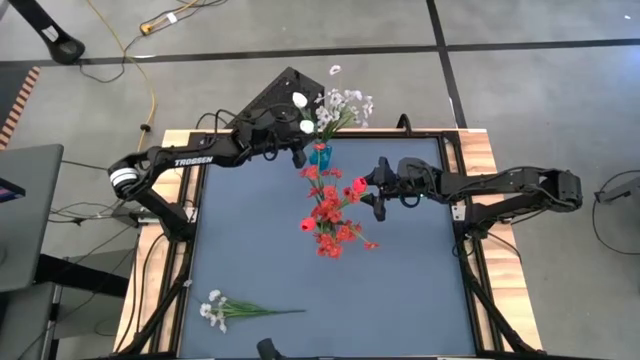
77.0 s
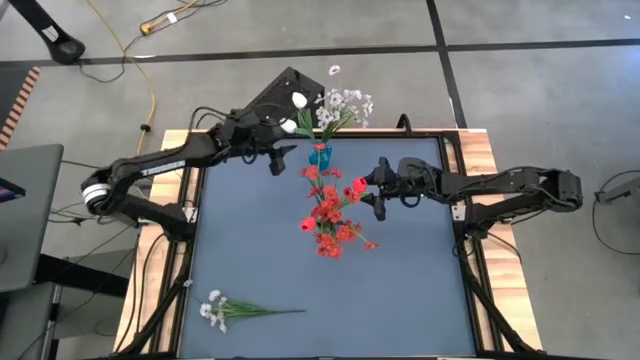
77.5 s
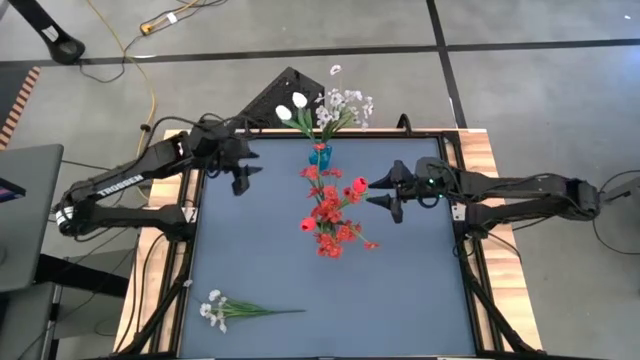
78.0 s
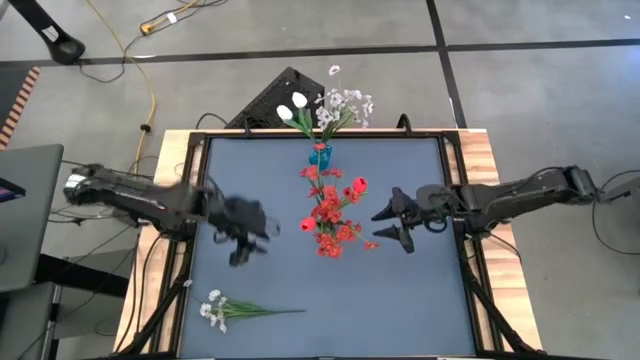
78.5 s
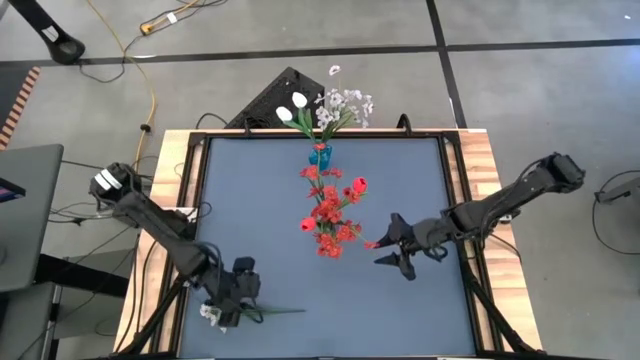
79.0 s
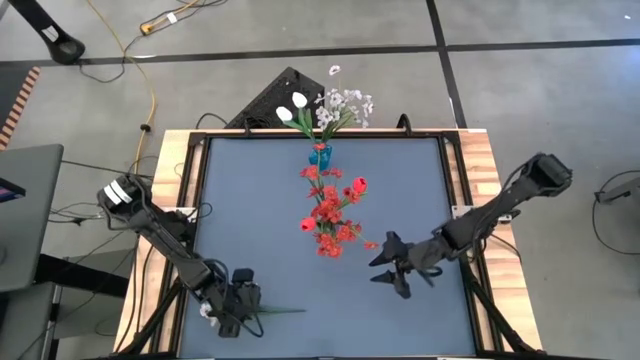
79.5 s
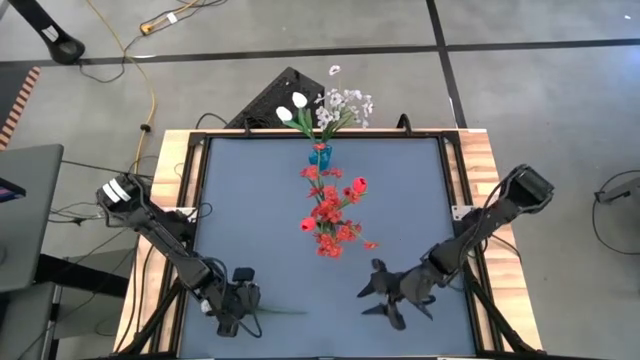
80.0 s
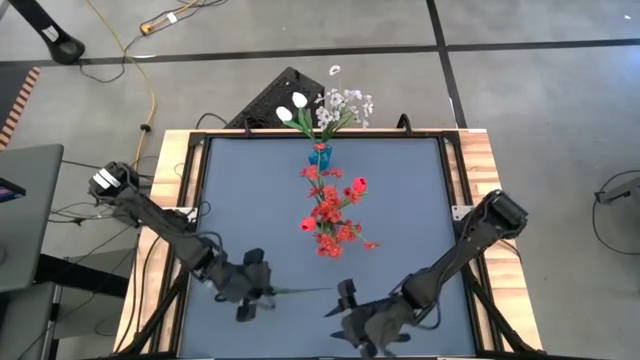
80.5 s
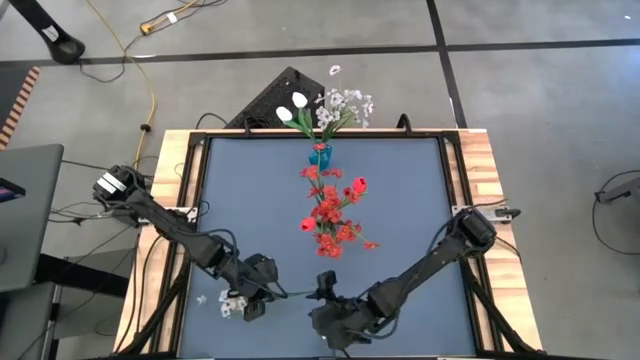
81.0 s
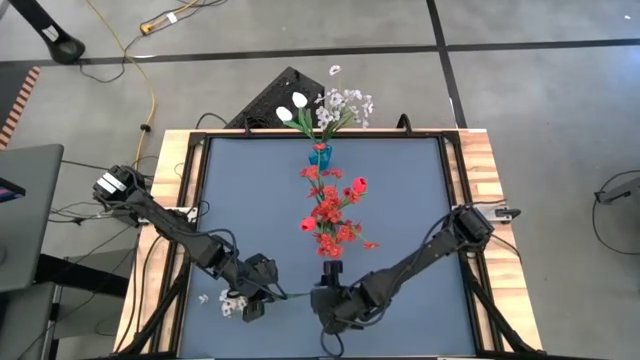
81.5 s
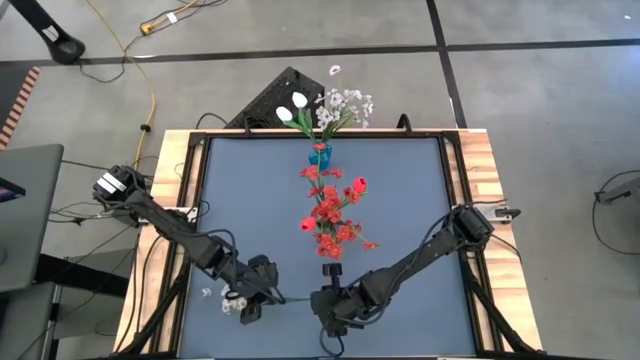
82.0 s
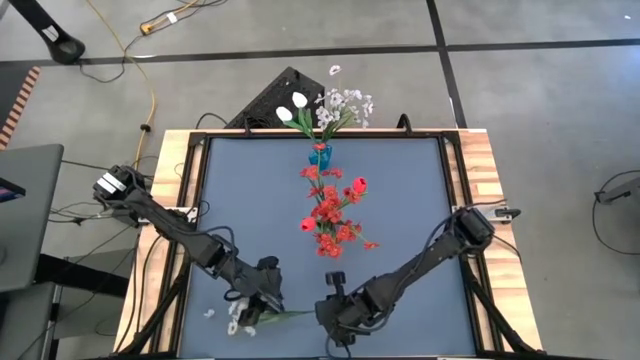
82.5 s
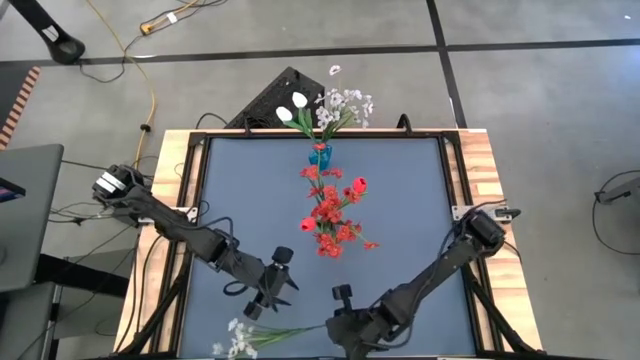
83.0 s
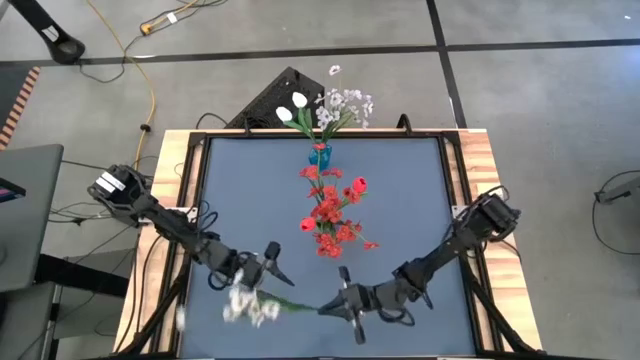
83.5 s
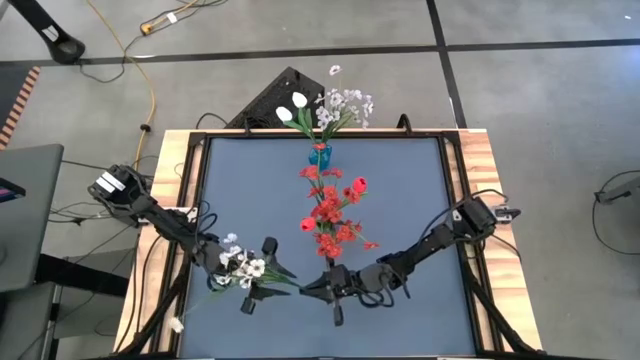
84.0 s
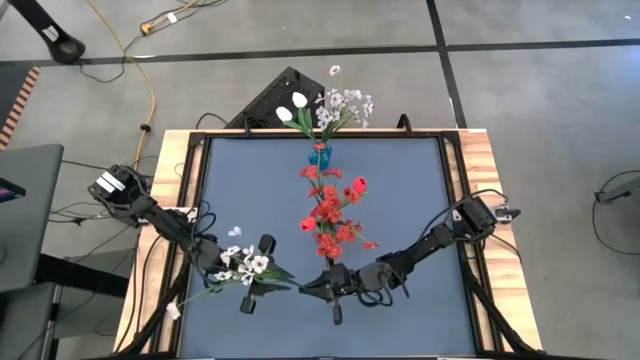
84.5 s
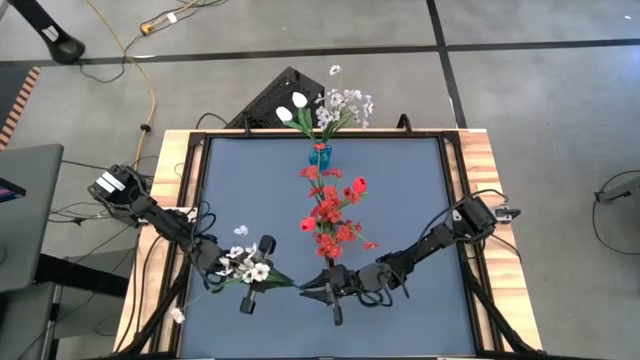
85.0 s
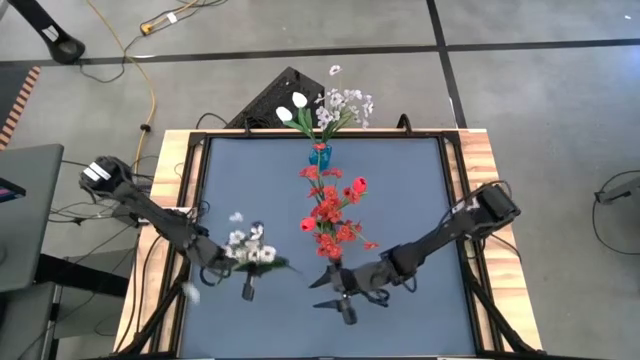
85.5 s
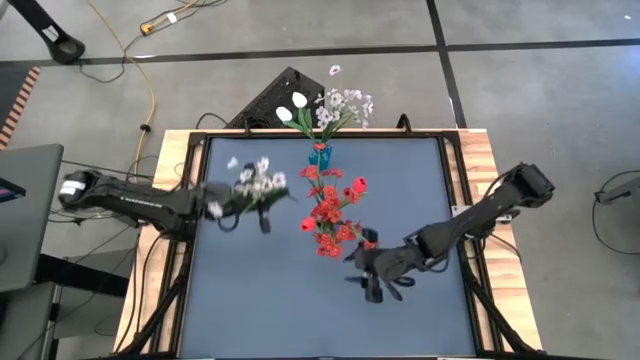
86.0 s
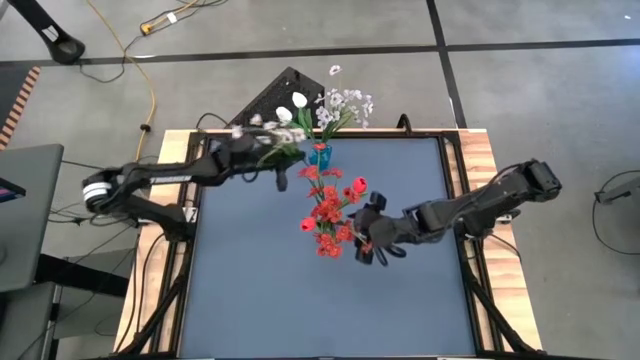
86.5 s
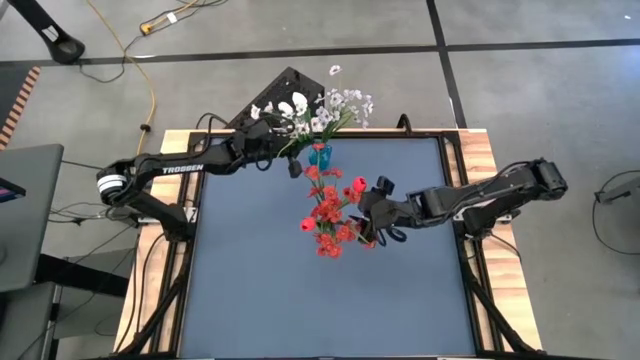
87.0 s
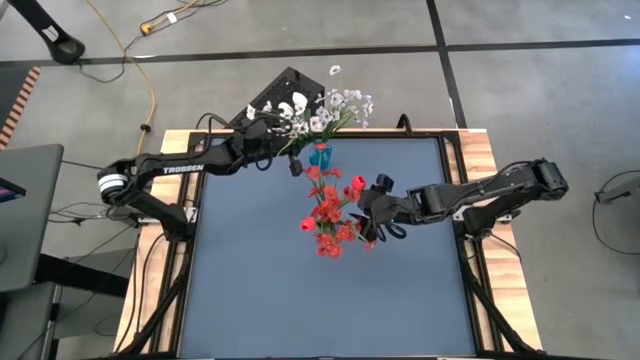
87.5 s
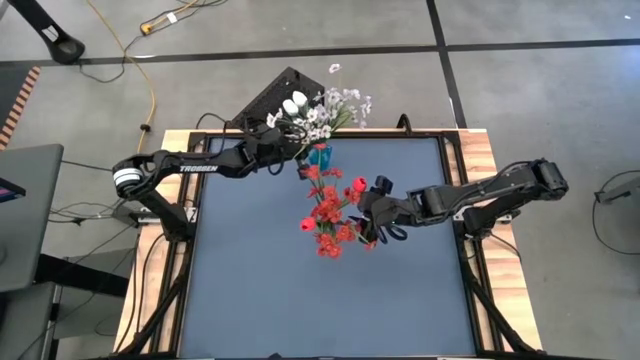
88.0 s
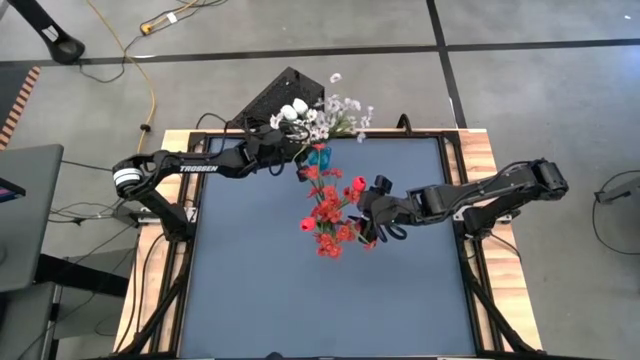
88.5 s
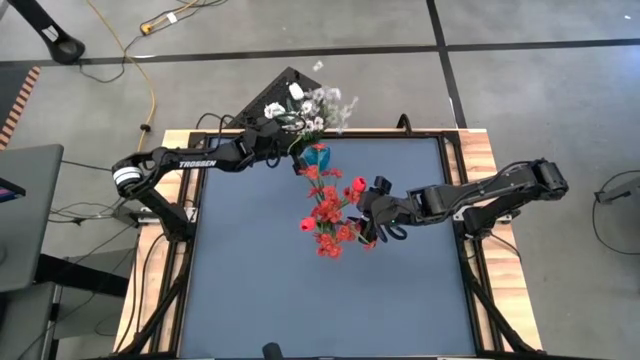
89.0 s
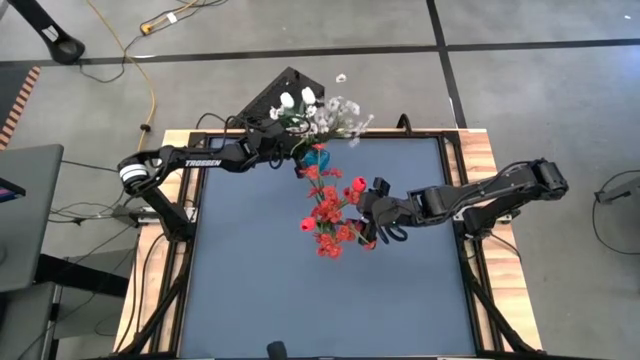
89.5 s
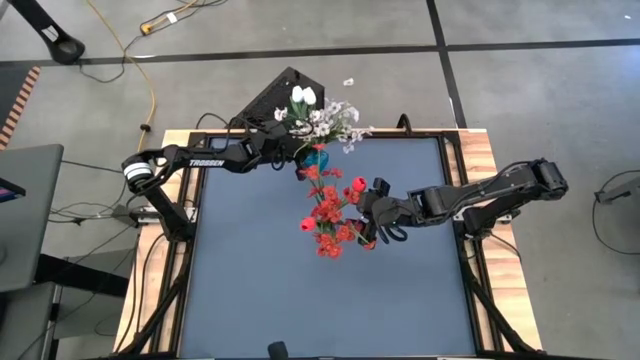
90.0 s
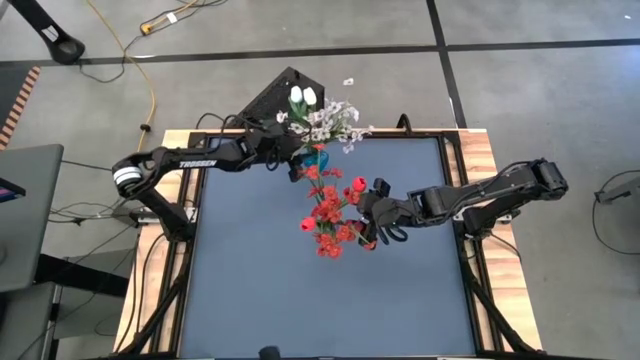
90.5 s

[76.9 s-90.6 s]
Task: Sort flowers into vase by color
Put the white flowers into the blue vase

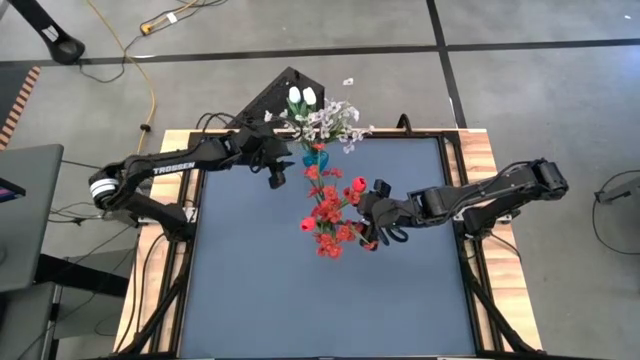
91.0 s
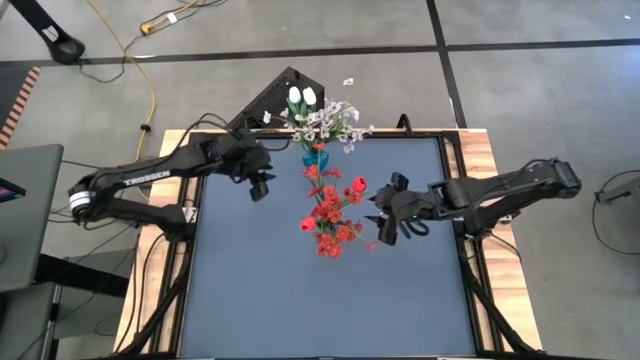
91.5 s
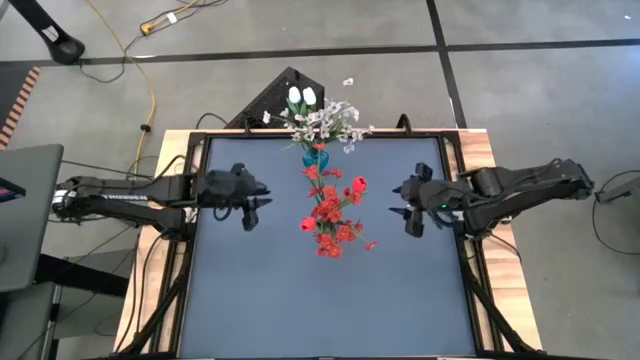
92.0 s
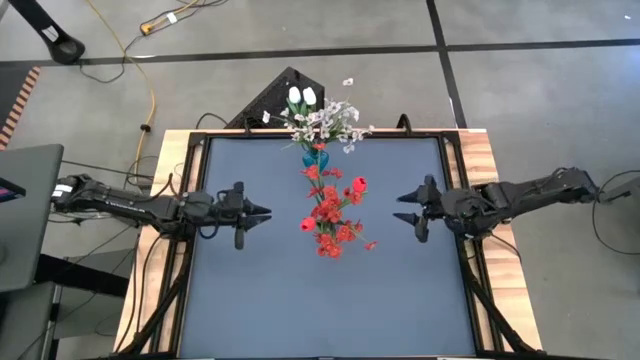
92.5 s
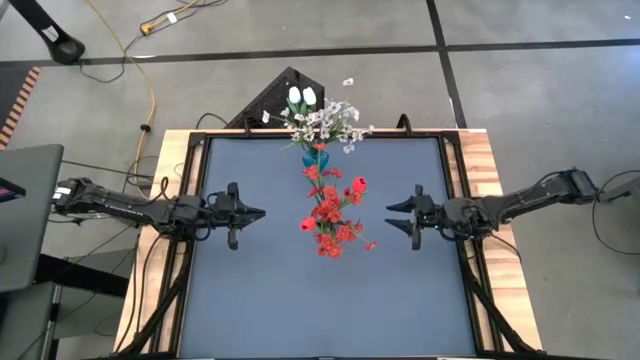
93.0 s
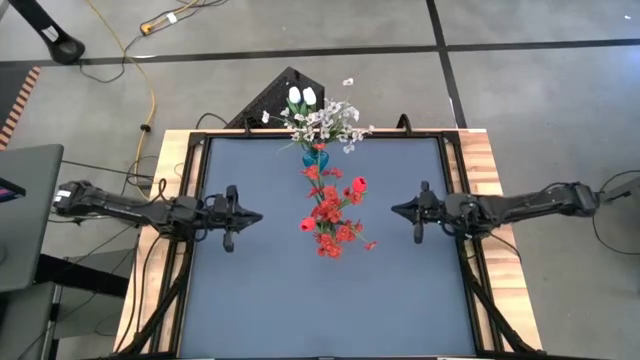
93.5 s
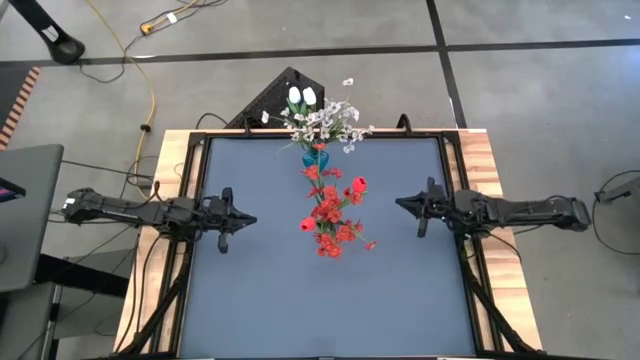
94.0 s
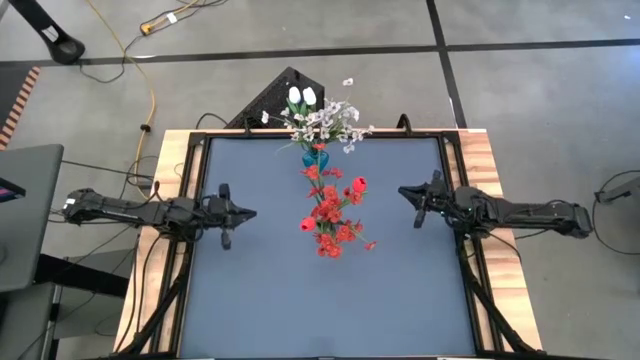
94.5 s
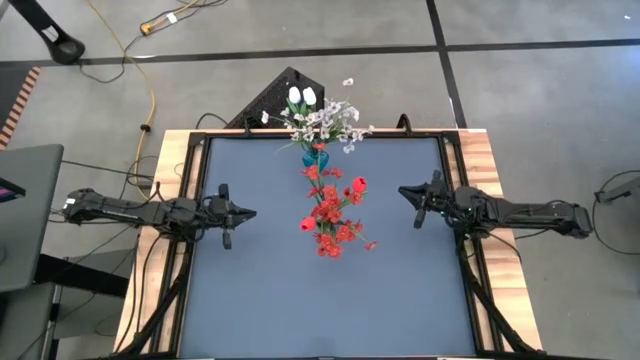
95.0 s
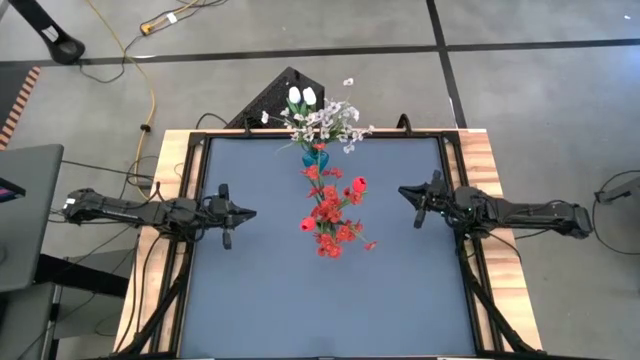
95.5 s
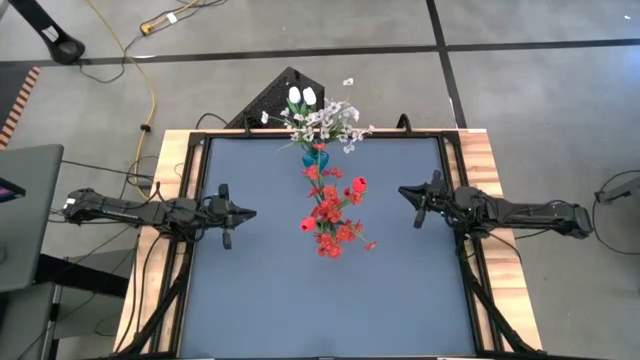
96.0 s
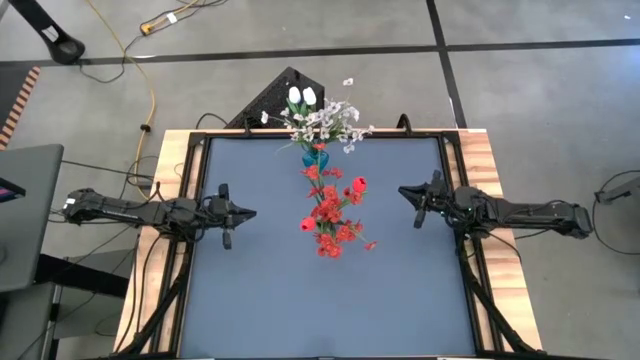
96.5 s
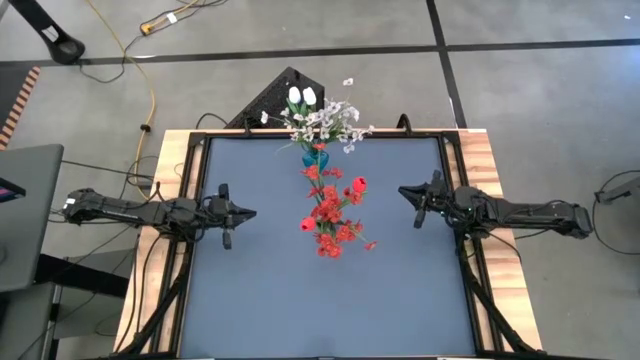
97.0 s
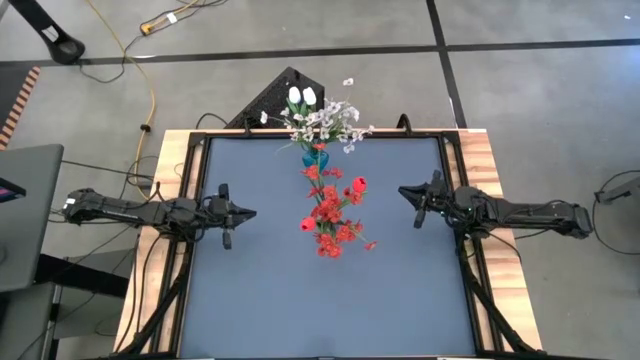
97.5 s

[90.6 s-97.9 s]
Return to Home Position

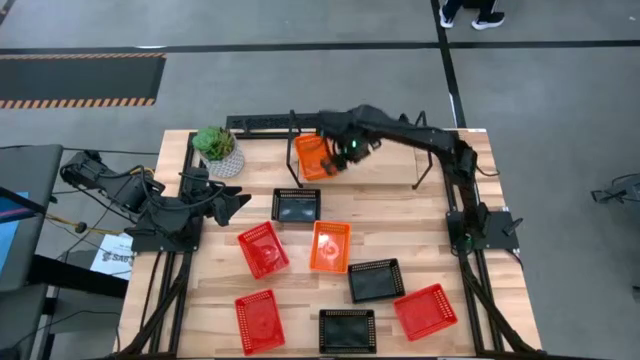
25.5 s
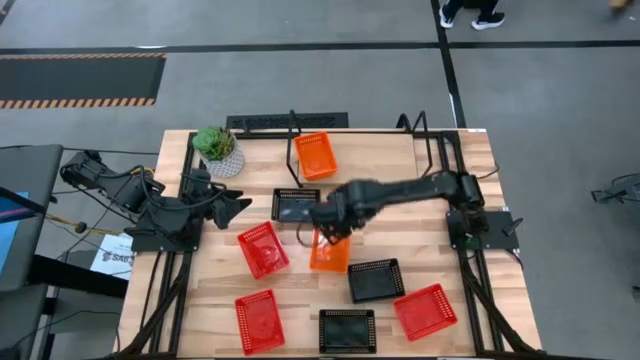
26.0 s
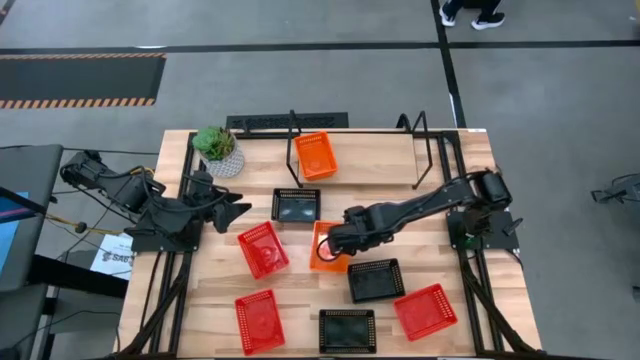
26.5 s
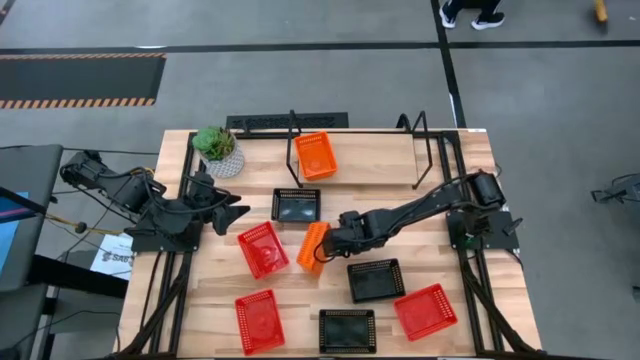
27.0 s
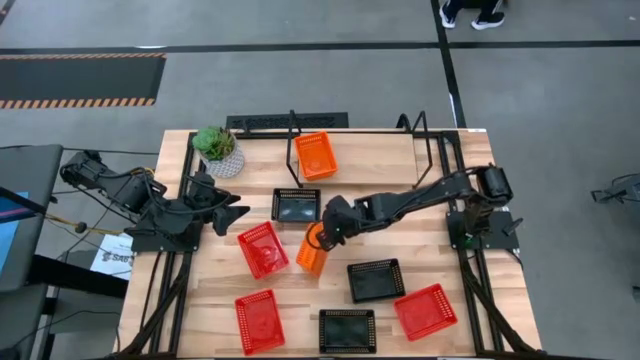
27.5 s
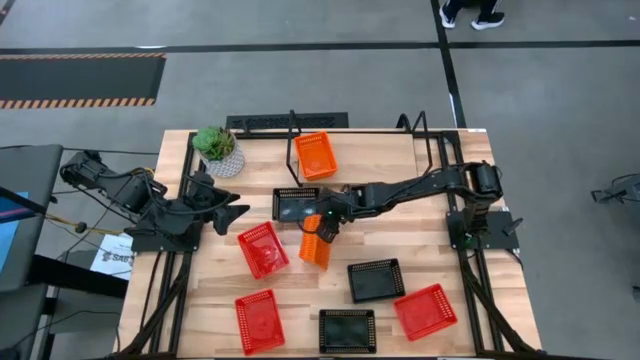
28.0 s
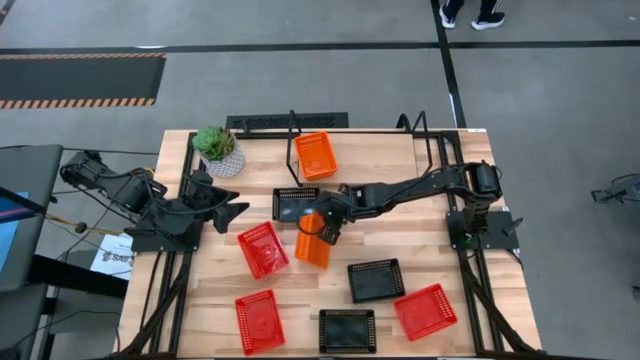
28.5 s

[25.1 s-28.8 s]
Task: Stack baskets on shelf by color
Stack the orange bin on top of the orange stacked bins on the shelf
